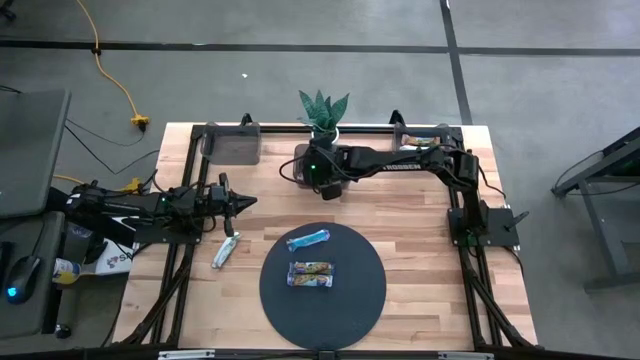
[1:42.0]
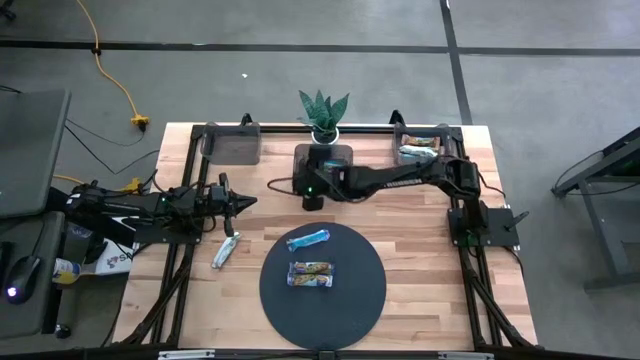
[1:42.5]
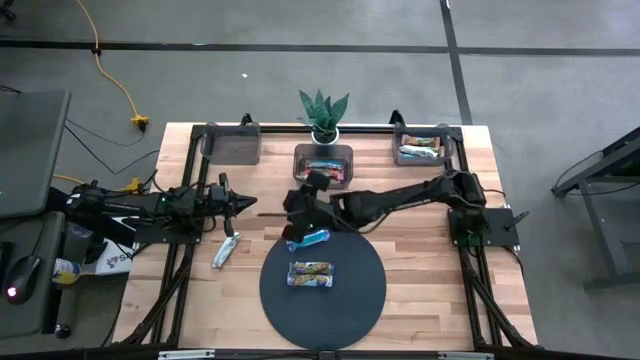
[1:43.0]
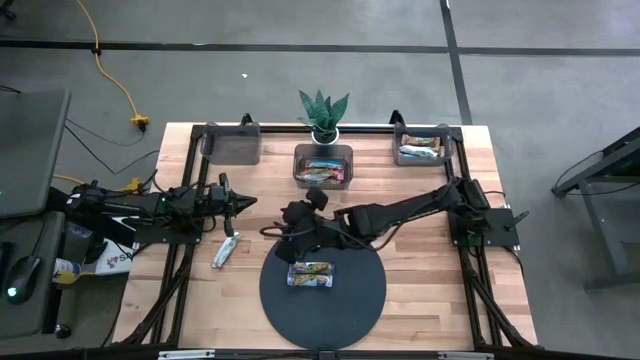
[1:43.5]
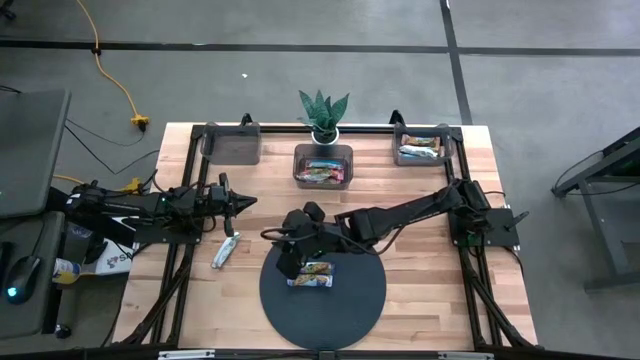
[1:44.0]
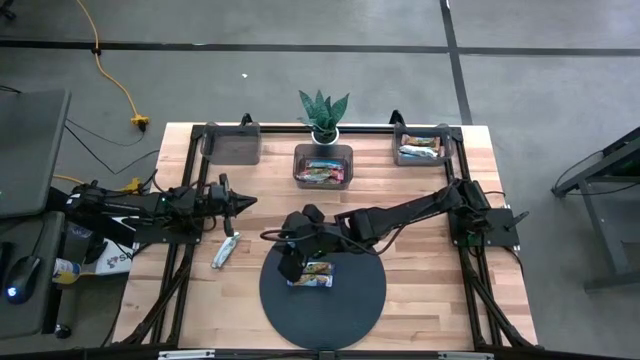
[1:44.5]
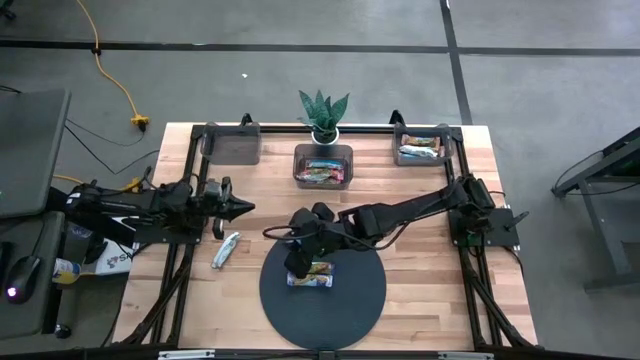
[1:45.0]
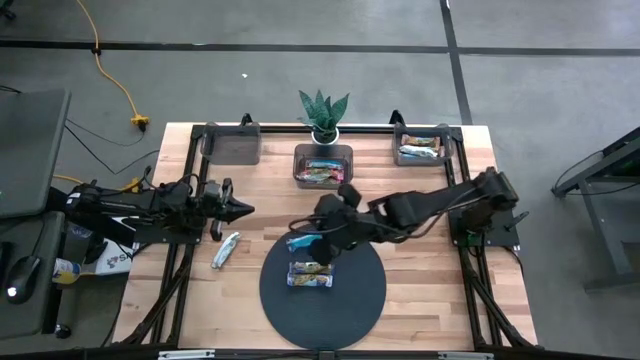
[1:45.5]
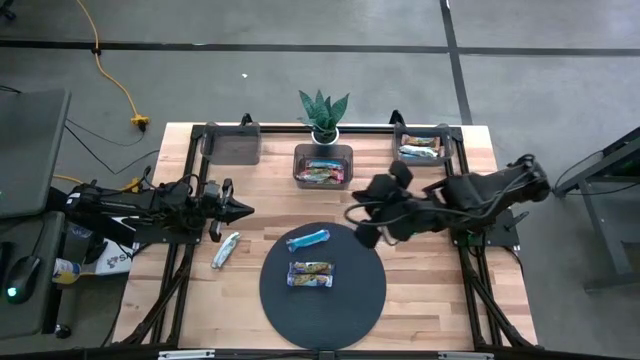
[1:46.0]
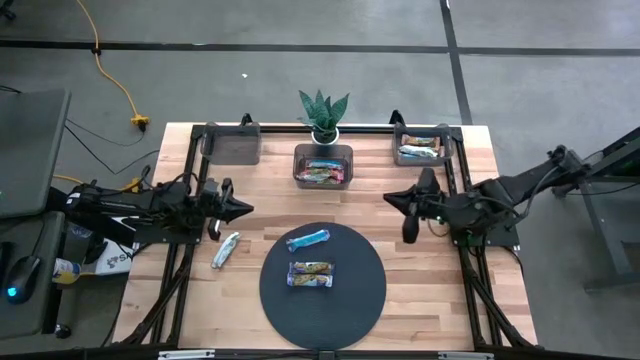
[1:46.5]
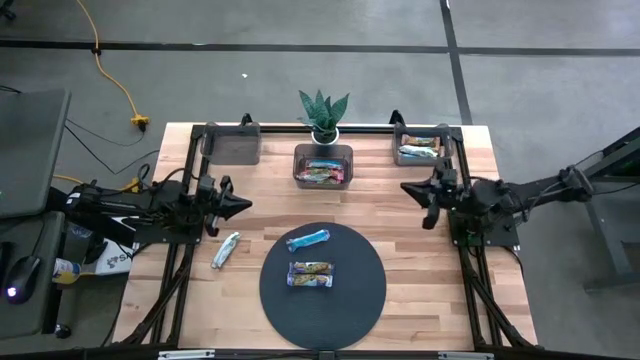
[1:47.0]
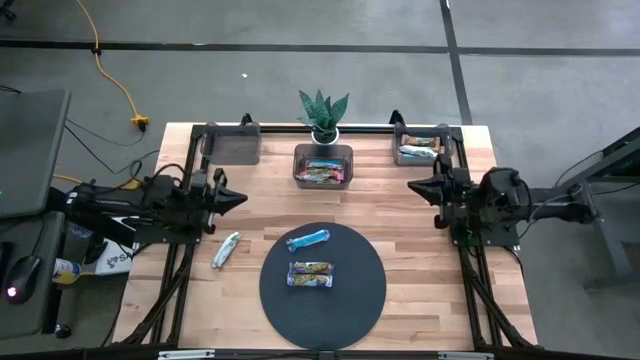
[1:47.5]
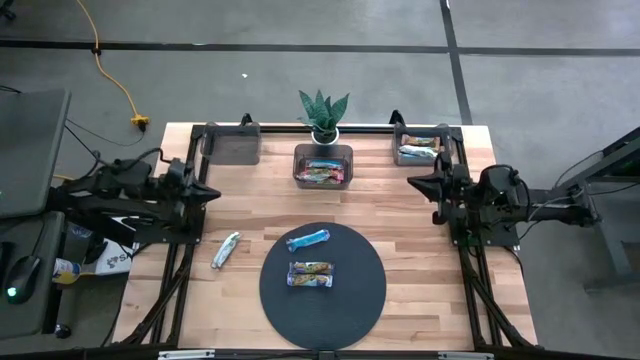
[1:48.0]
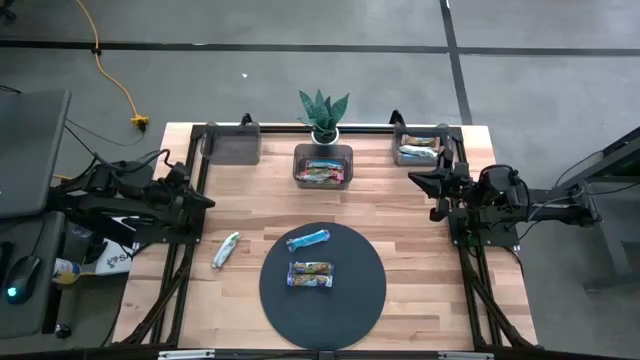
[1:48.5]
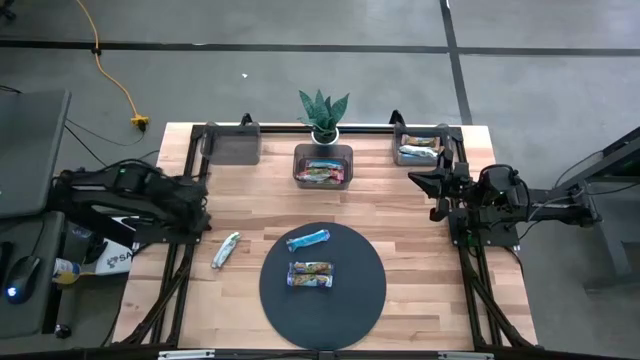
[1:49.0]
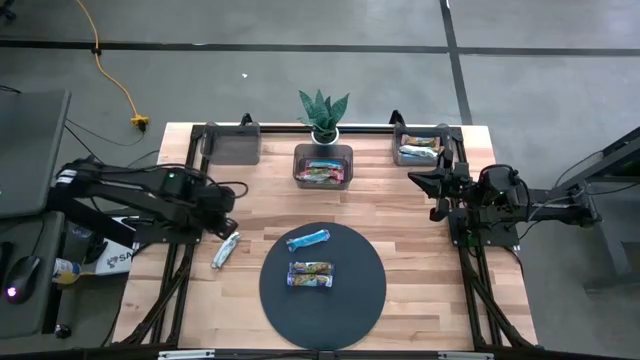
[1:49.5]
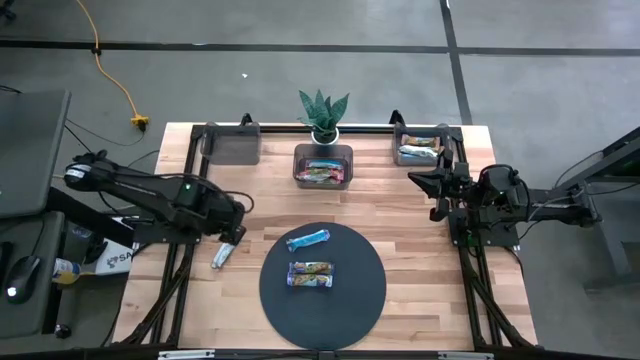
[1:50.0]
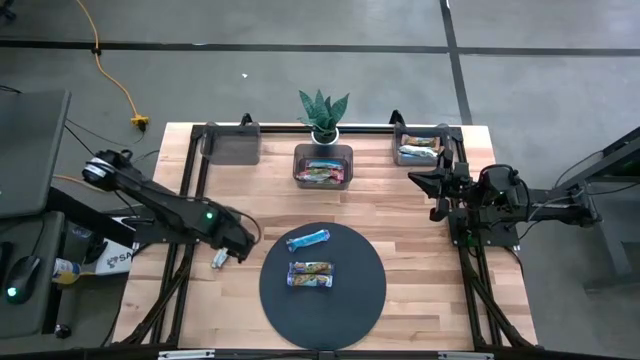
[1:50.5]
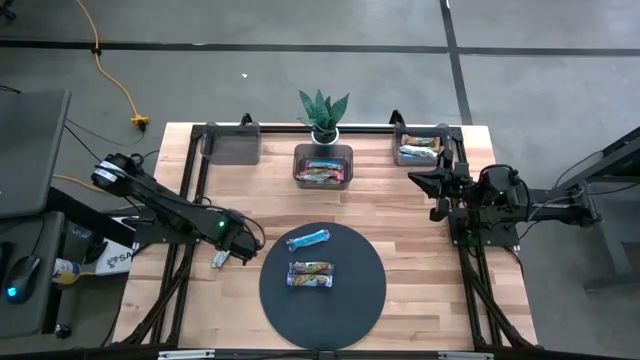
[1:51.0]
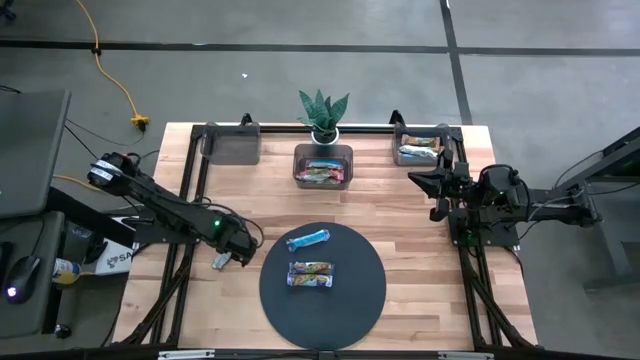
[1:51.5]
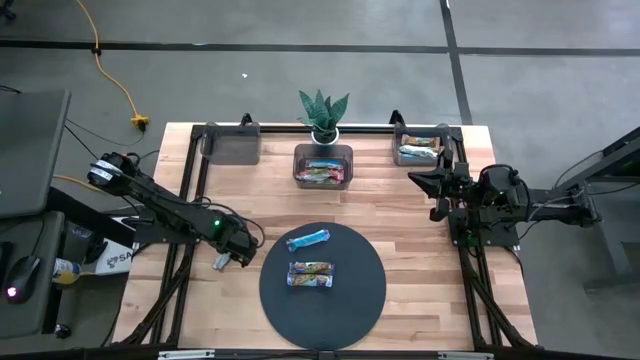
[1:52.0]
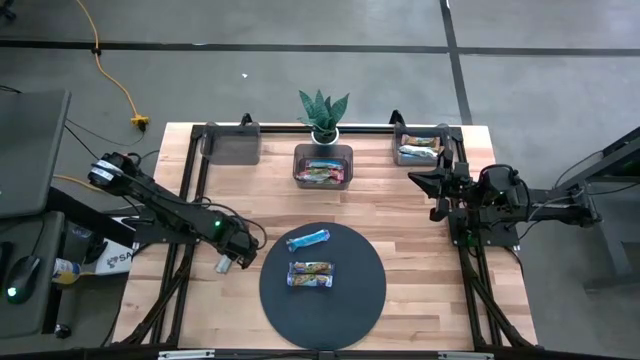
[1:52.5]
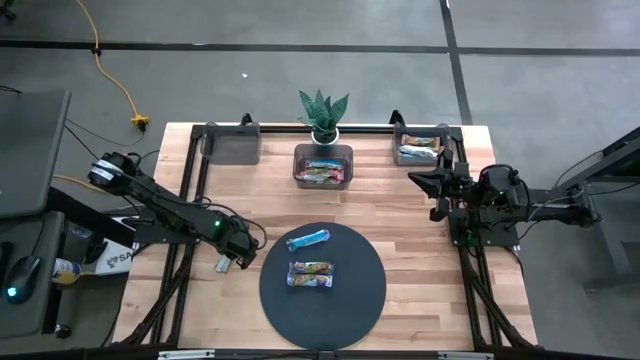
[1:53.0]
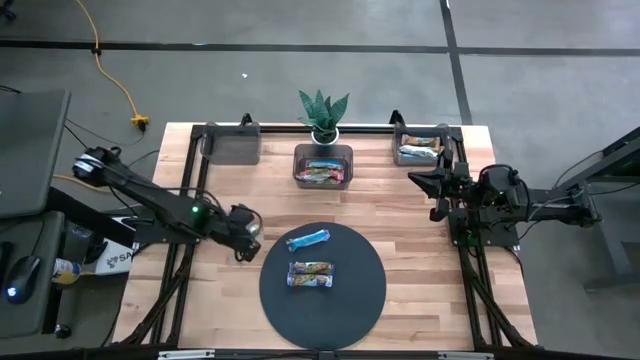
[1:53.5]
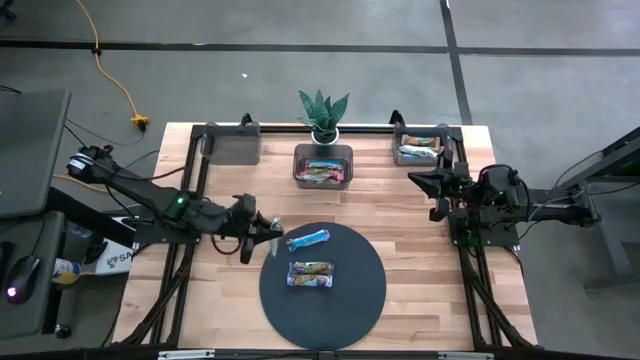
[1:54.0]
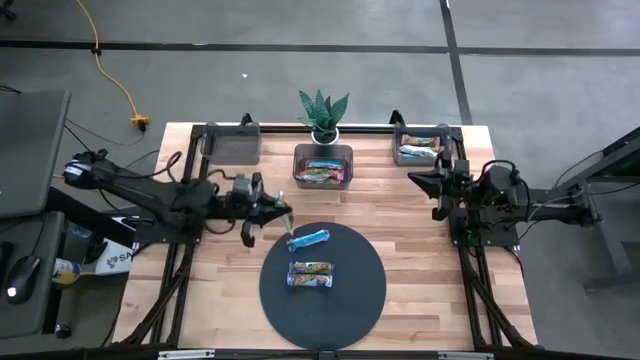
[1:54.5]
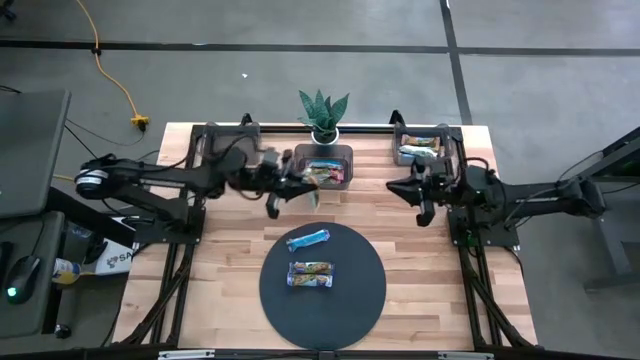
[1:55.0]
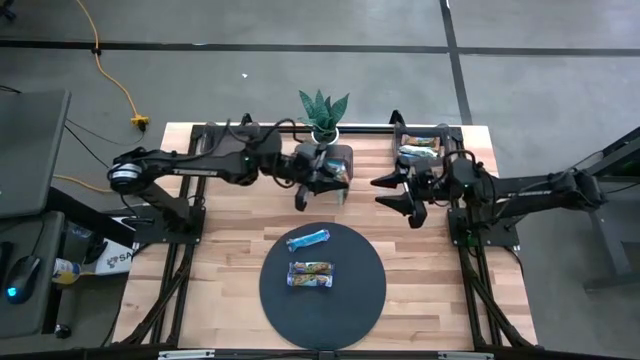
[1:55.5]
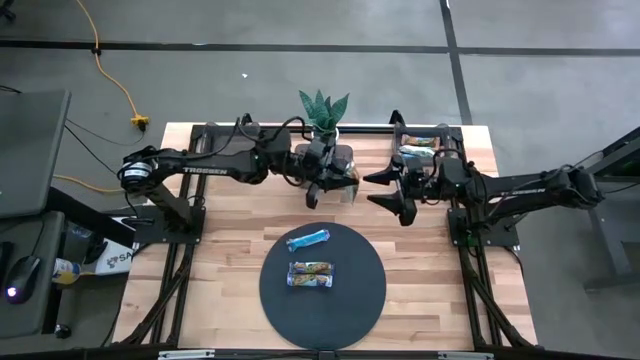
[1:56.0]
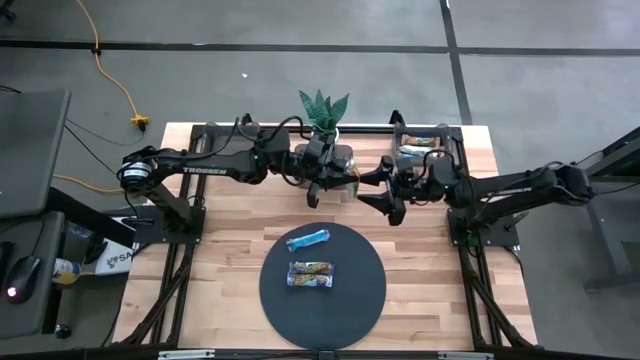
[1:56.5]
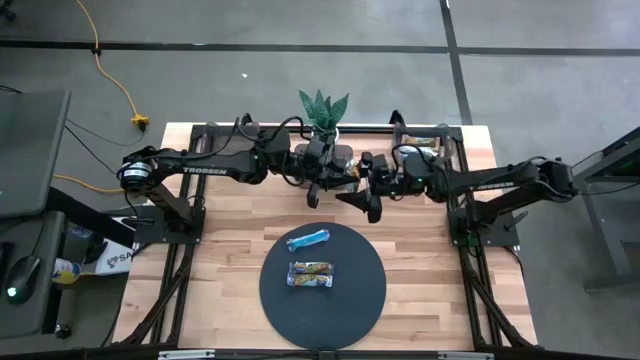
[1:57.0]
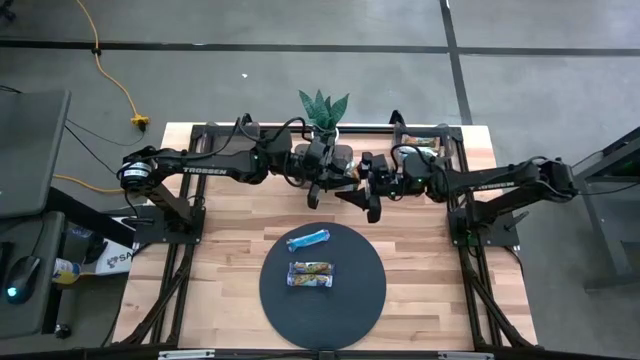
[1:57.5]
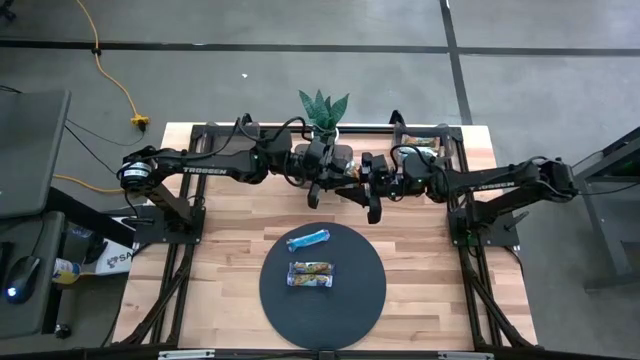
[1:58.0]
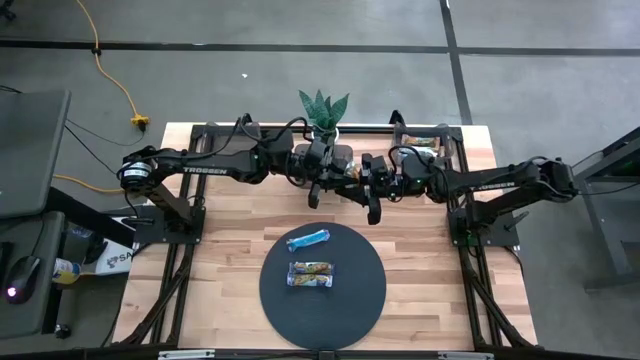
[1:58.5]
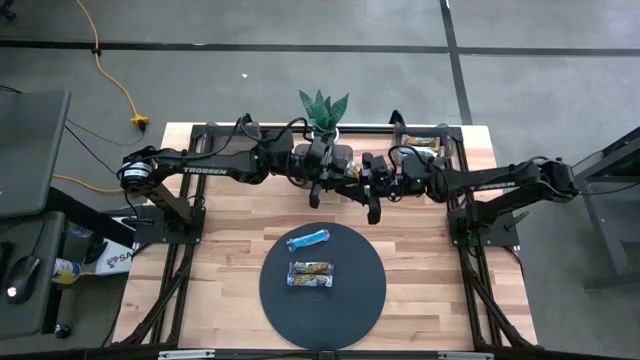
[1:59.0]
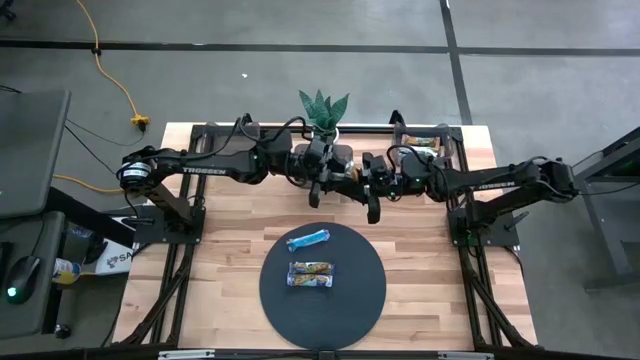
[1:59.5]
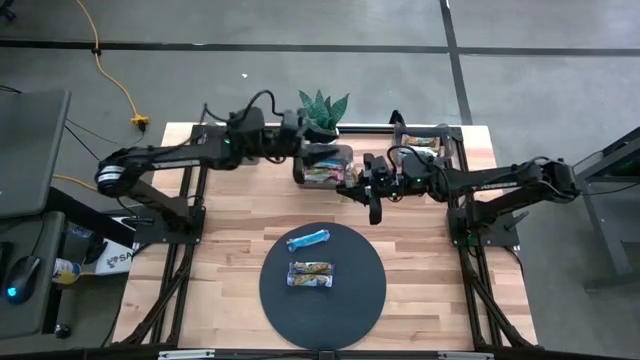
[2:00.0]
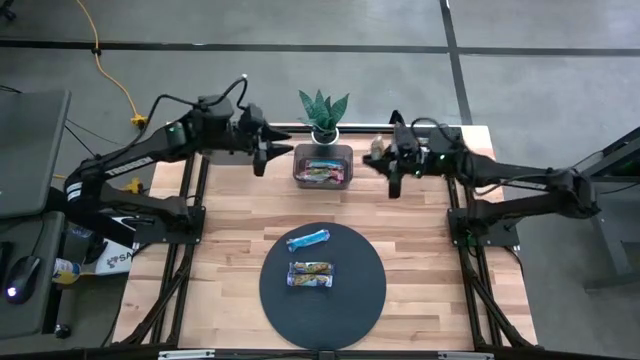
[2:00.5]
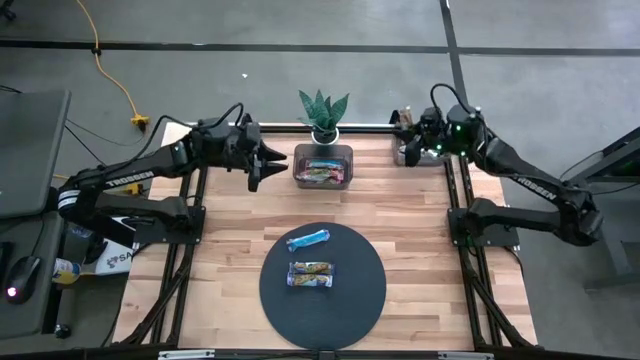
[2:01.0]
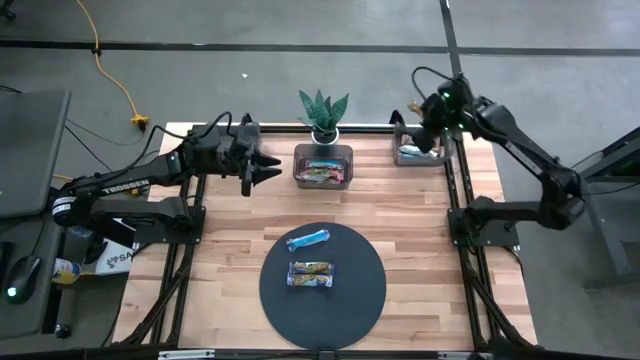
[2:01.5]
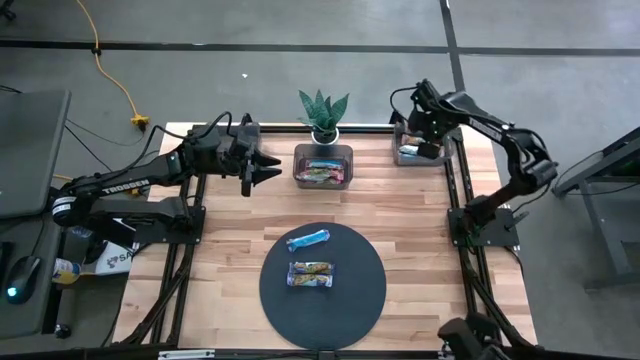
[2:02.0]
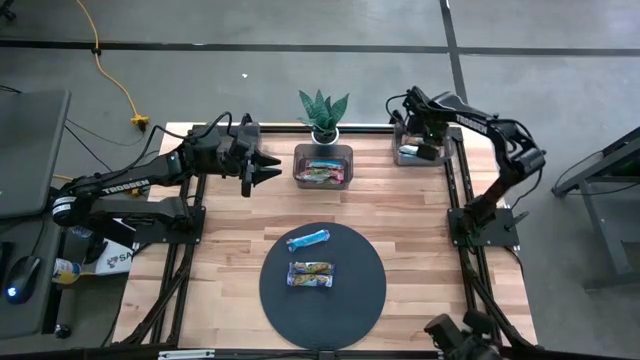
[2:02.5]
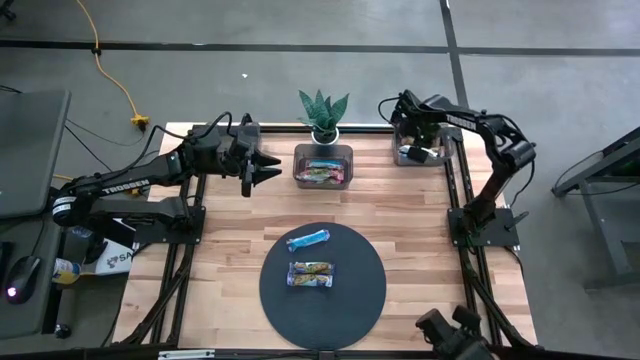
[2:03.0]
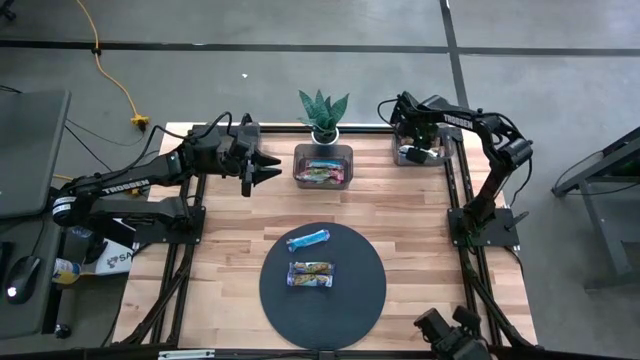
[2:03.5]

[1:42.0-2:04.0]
Task: Pick and place Granola Bars by type
Put the yellow granola bar into the right black bin
